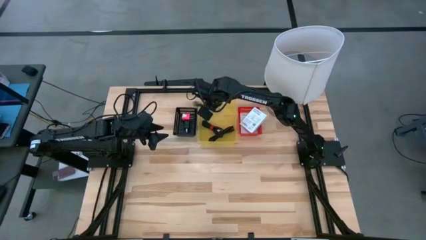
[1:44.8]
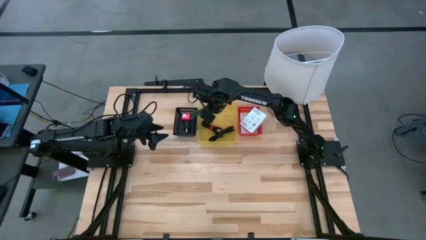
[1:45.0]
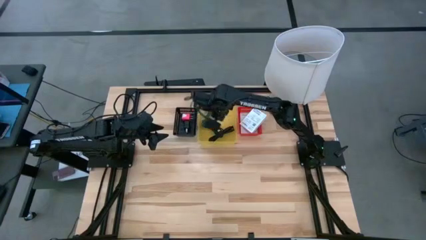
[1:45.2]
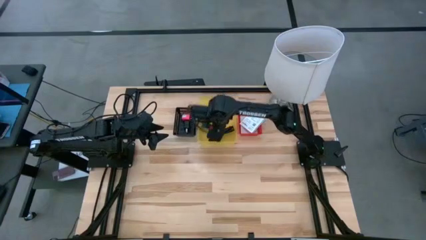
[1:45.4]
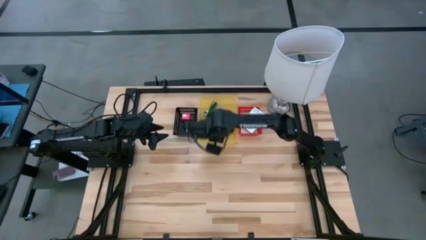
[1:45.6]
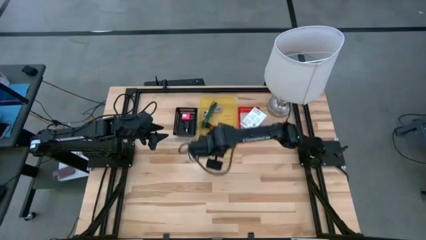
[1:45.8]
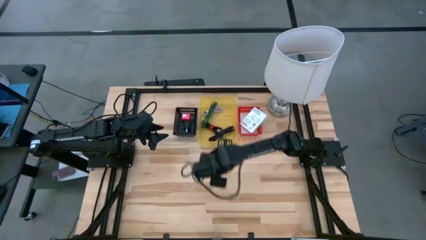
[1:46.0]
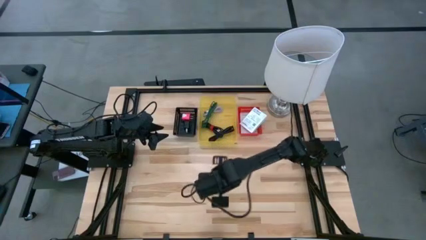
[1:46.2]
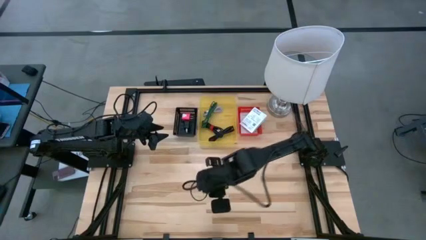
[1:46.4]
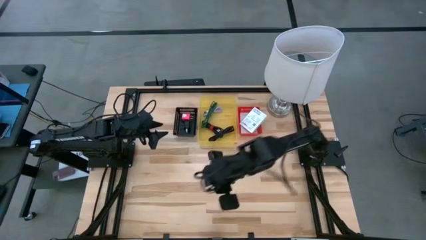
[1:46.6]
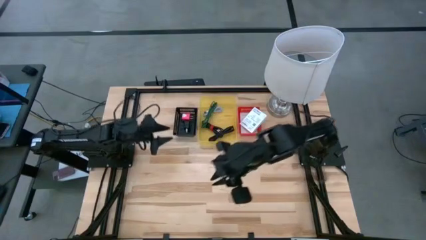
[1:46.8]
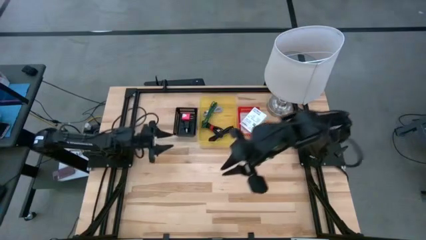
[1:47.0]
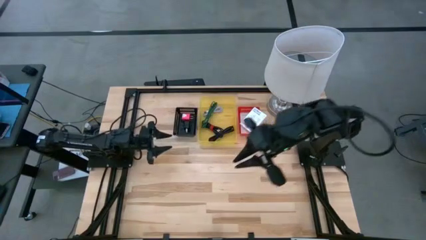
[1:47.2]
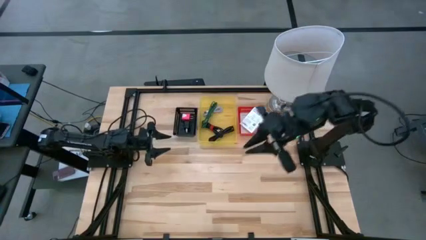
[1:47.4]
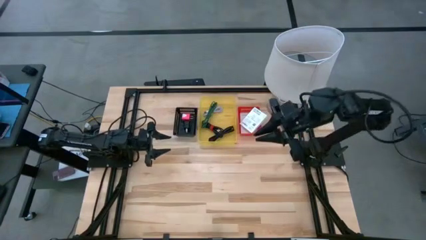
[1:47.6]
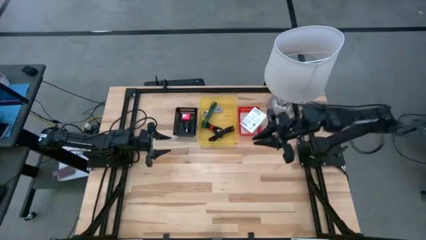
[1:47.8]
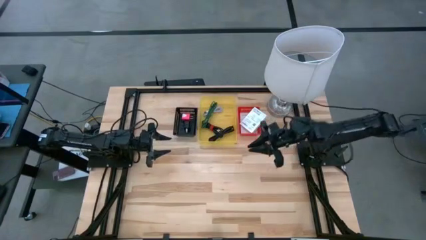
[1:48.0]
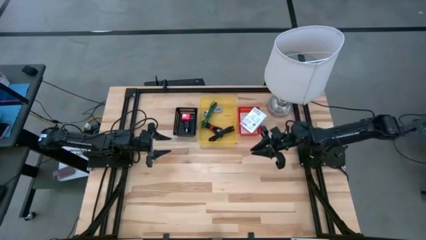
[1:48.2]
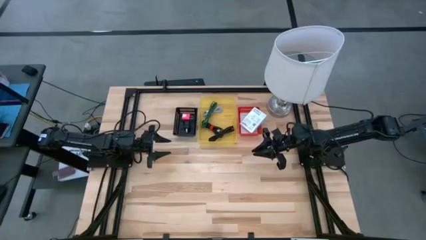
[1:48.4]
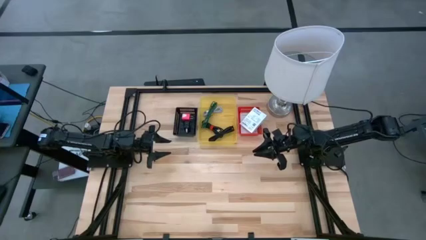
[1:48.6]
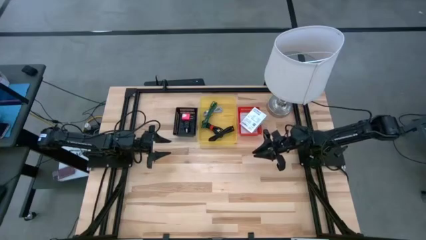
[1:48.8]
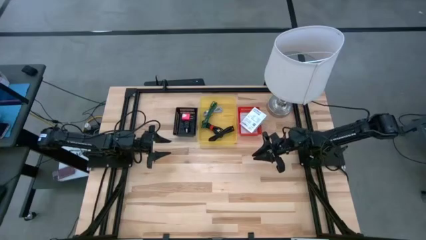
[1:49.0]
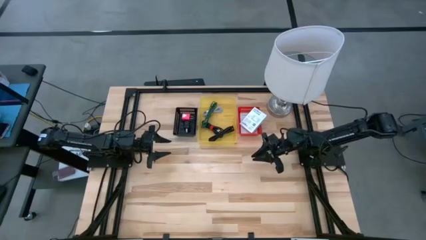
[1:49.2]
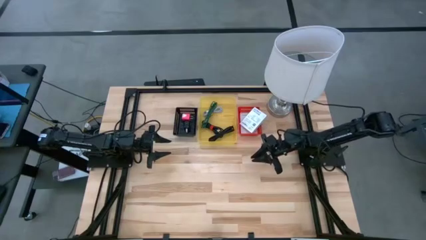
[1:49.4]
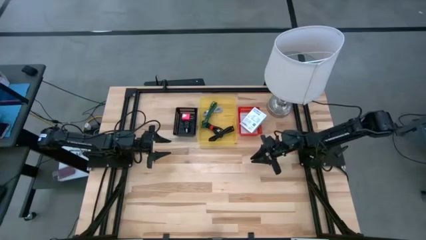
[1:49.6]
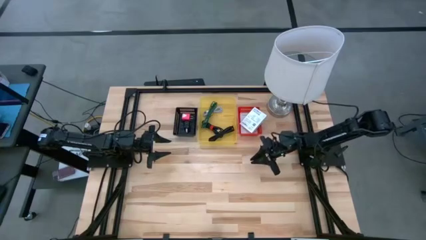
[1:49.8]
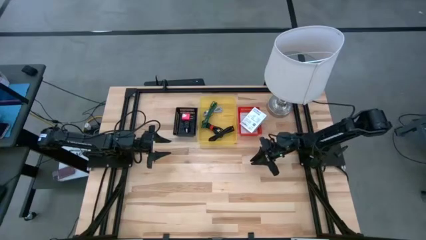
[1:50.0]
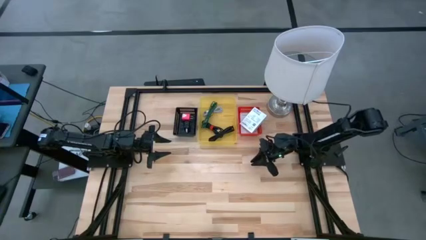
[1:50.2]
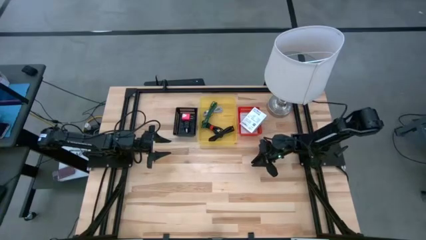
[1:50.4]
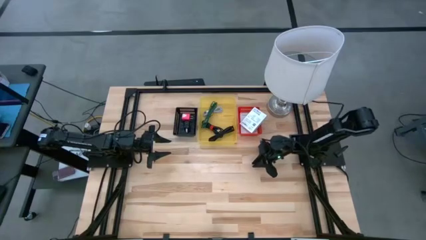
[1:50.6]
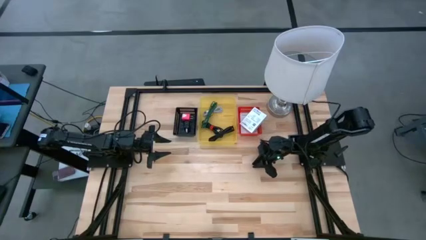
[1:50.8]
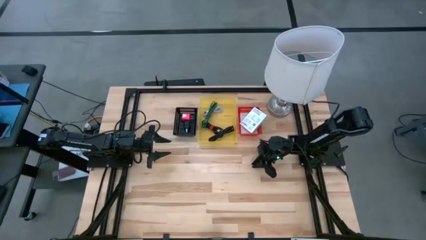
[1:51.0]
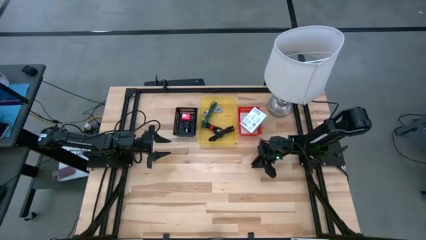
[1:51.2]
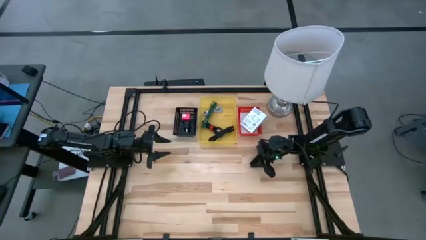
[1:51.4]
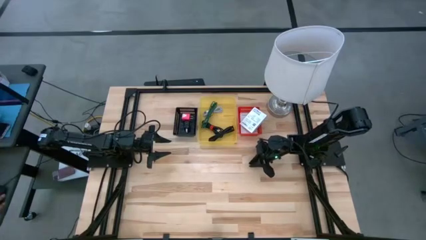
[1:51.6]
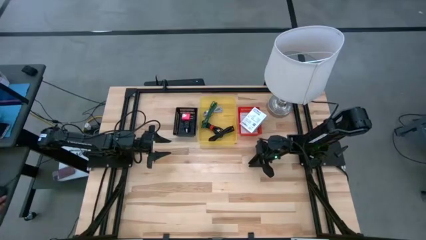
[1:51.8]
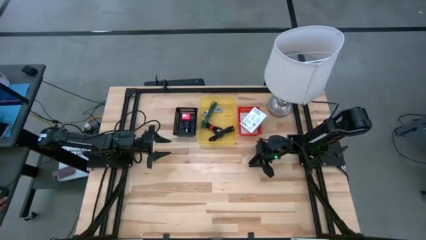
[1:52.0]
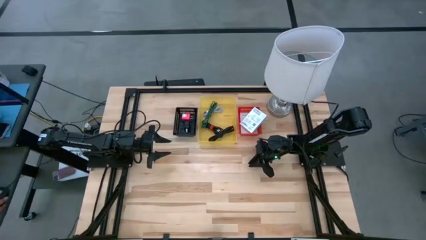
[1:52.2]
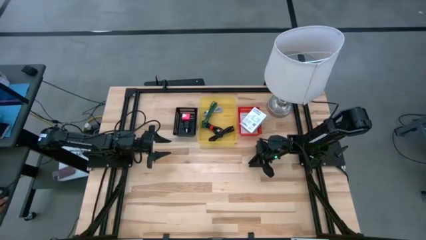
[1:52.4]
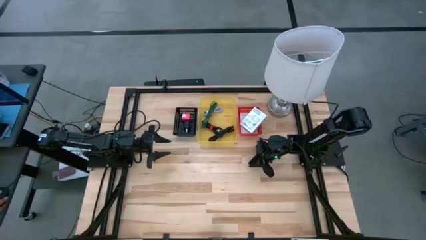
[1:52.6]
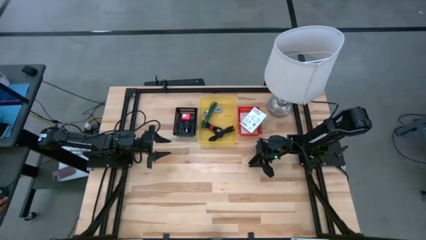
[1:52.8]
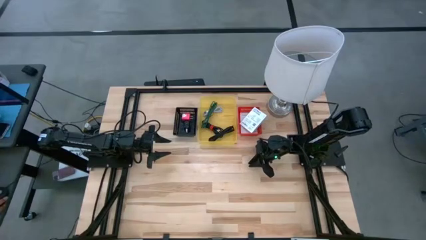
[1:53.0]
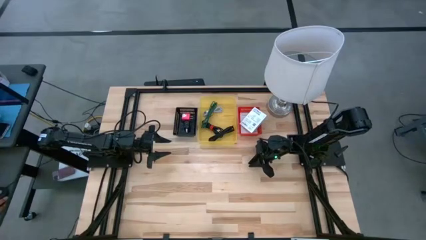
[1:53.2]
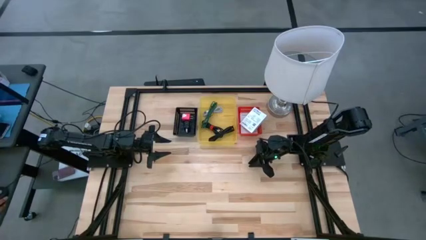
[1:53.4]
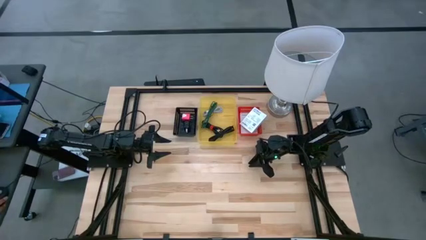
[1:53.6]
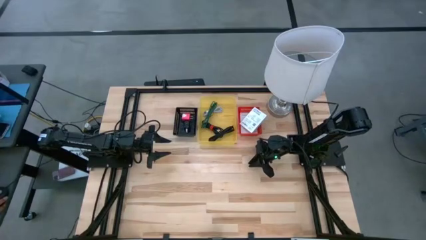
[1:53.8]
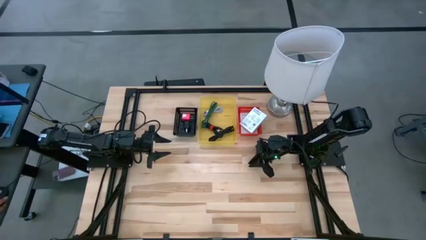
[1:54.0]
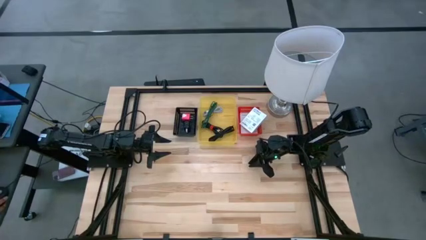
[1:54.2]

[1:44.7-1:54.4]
Task: Pick and place items into bin
Return to Home Position

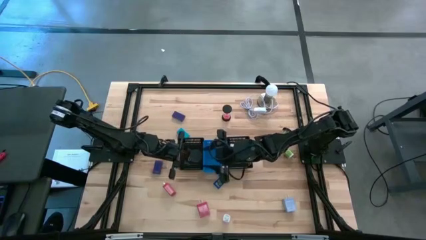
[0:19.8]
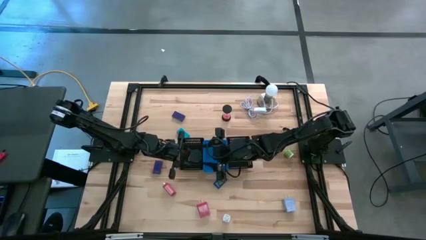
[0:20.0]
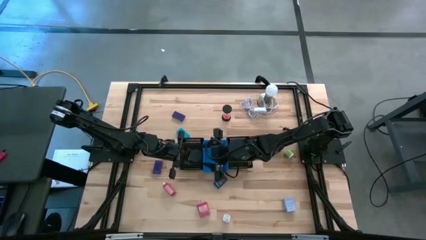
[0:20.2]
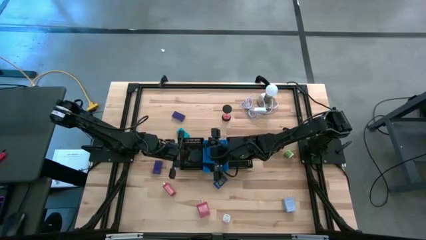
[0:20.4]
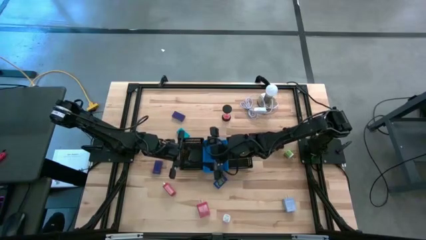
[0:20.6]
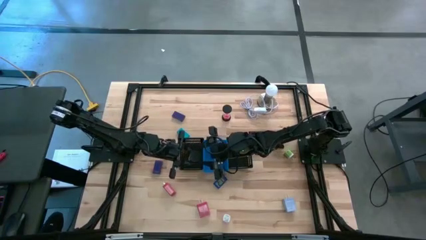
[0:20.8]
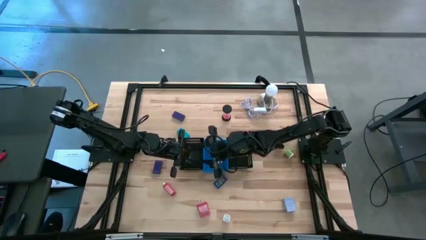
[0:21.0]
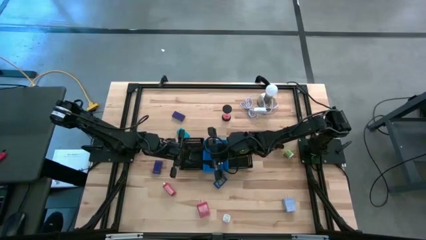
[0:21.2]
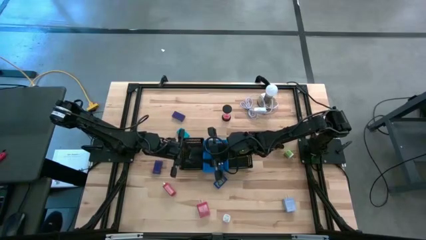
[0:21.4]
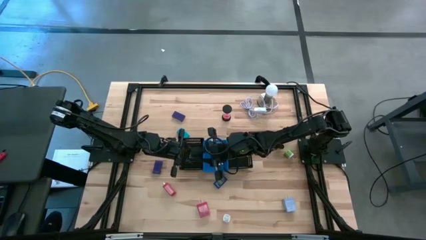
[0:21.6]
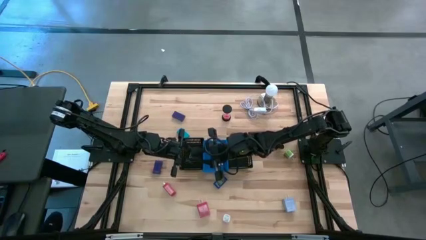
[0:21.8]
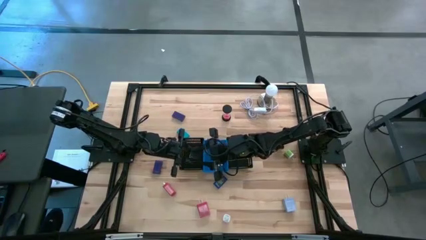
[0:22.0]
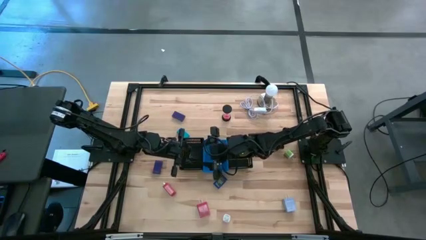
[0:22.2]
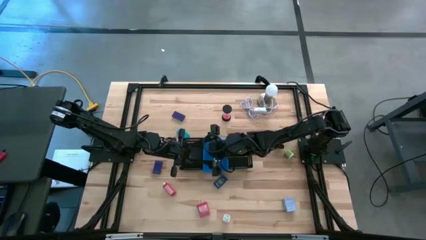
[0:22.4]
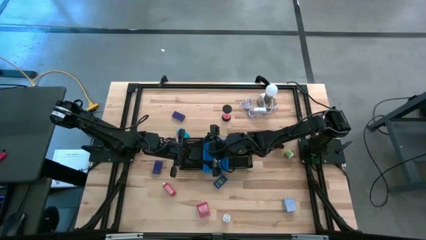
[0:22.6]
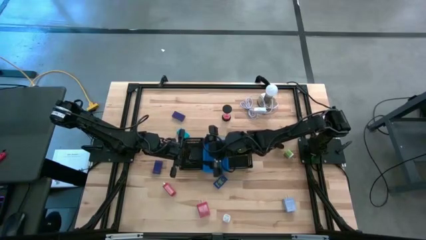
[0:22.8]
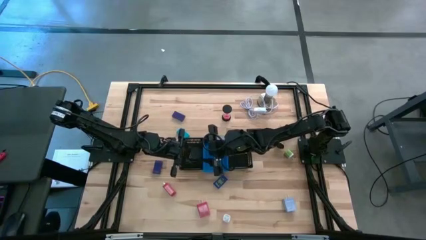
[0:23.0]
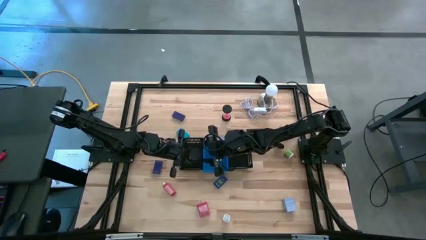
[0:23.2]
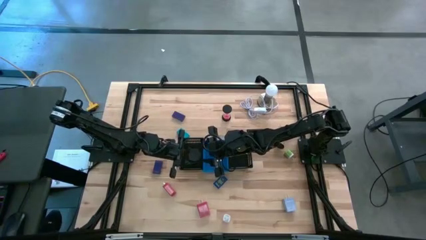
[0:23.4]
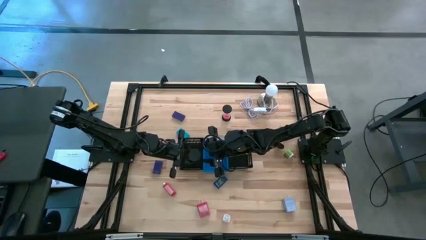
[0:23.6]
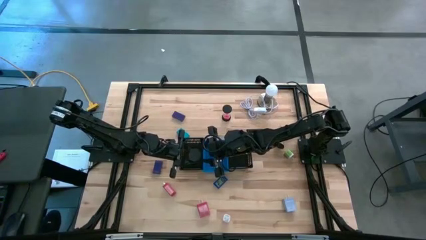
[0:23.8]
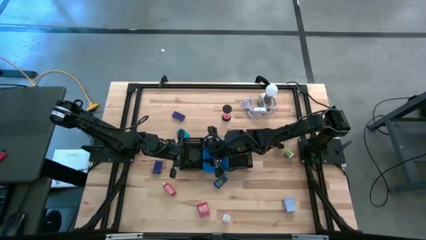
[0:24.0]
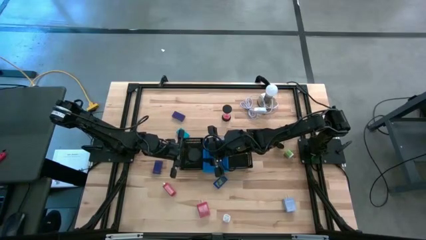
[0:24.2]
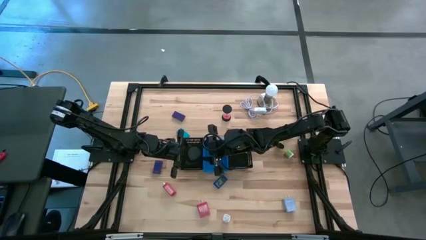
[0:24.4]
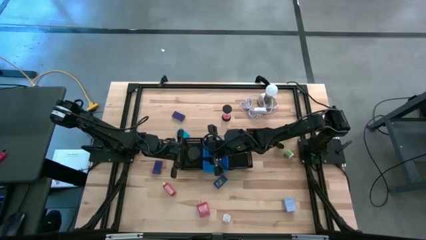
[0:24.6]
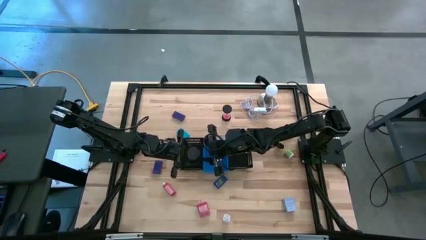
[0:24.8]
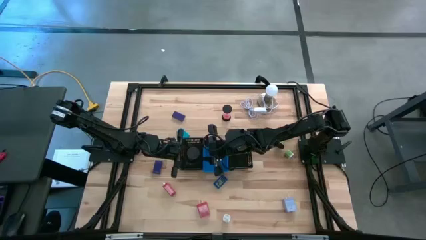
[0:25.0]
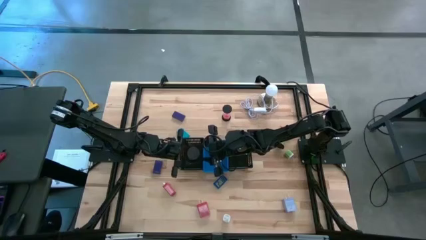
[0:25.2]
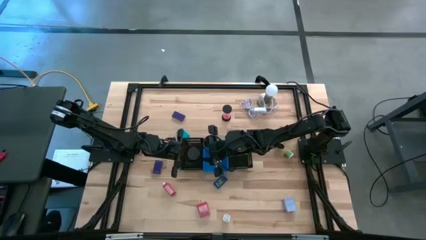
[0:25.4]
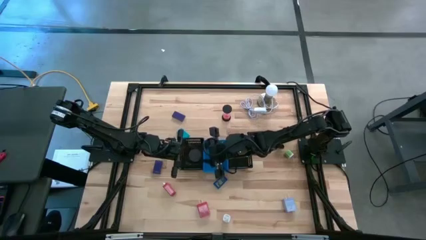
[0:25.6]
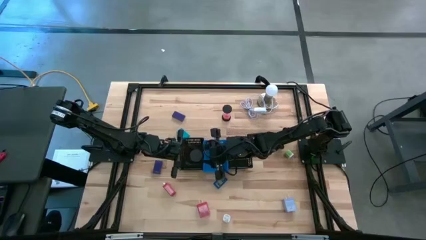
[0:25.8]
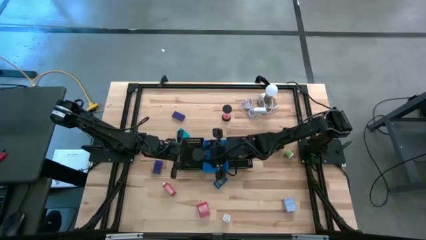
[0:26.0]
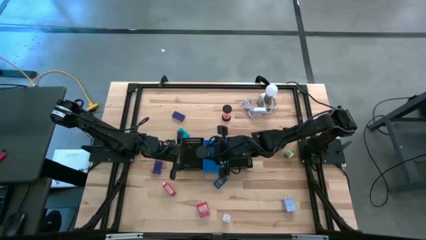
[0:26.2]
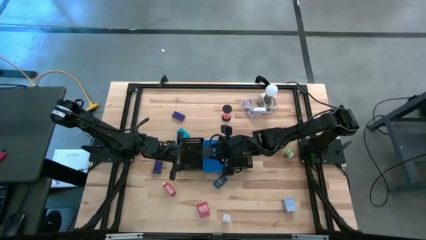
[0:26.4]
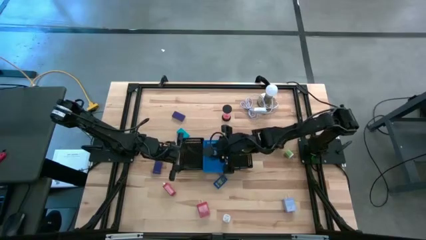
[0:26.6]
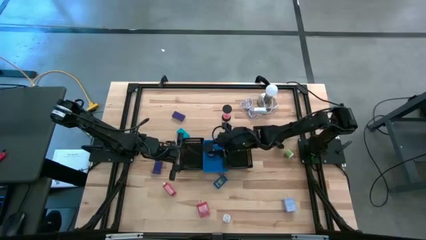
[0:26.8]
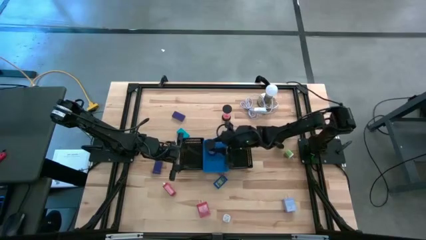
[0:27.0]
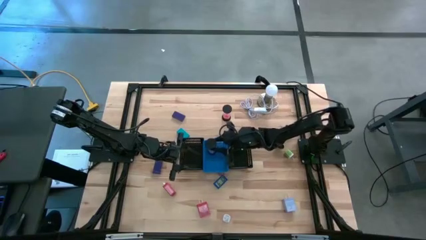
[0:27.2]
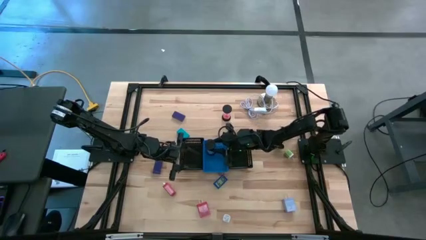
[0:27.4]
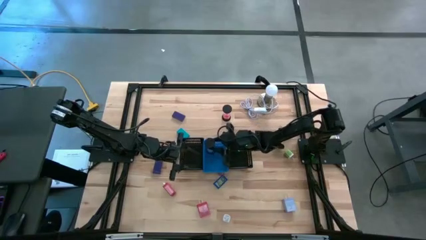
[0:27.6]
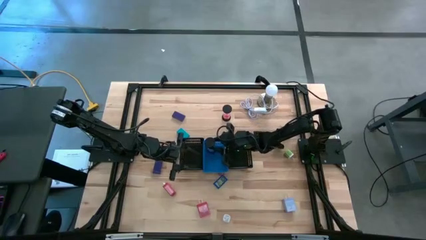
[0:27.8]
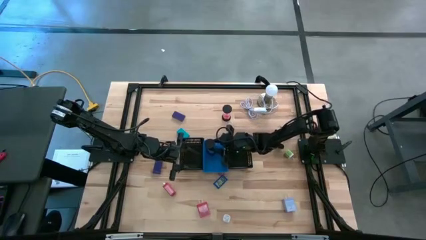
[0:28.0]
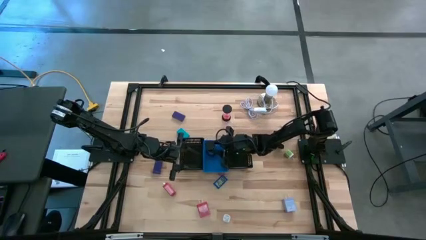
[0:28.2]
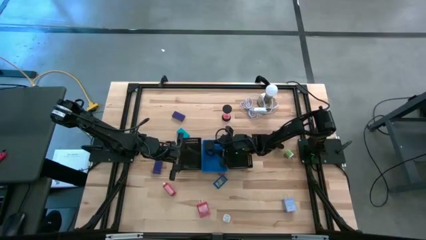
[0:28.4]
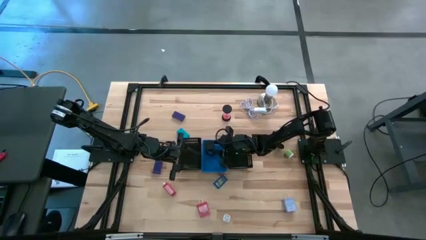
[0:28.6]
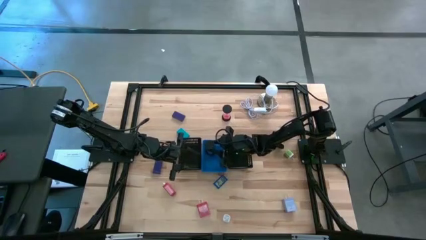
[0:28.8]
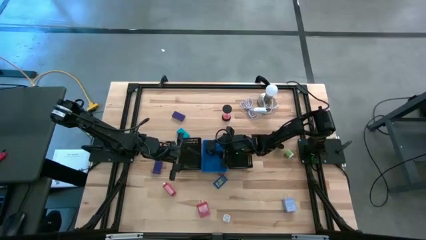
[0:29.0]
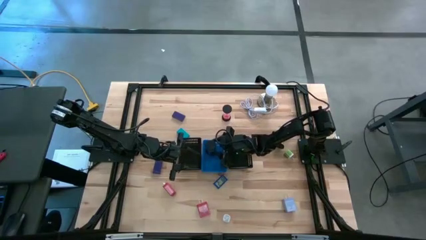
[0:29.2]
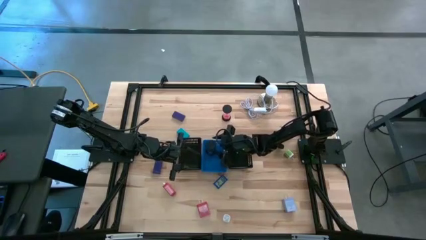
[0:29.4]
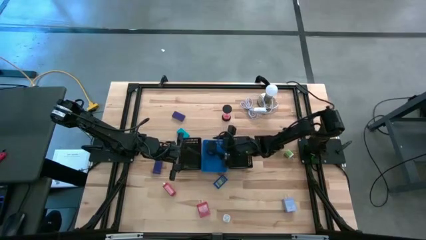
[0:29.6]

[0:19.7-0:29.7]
Task: Pick & Place Office items
Put the blue hourglass into the blue bin
